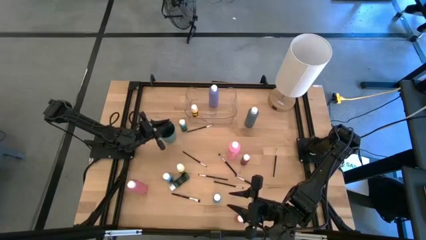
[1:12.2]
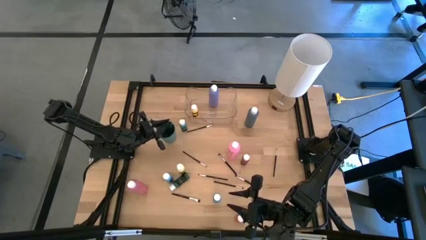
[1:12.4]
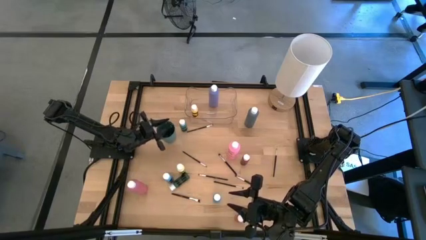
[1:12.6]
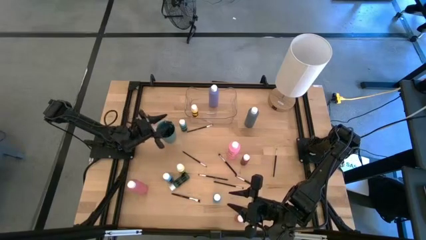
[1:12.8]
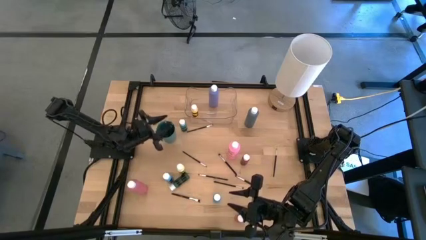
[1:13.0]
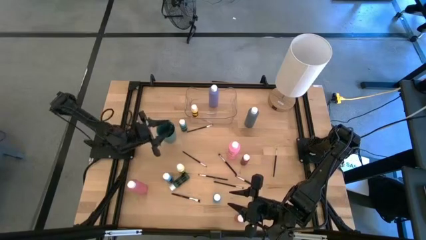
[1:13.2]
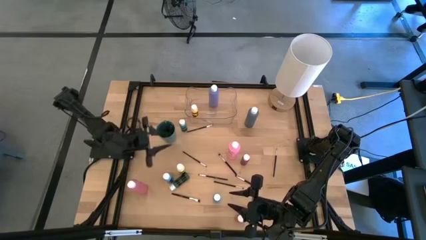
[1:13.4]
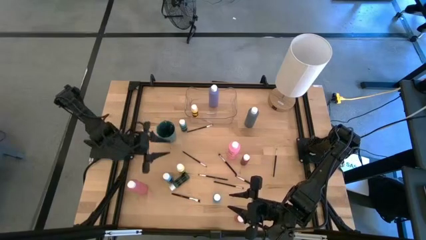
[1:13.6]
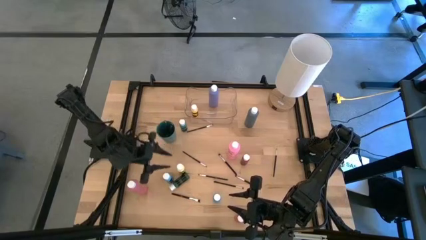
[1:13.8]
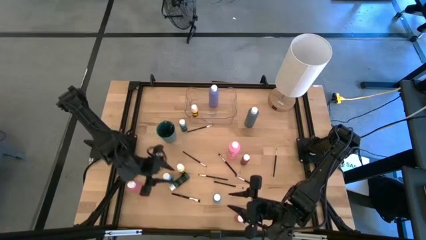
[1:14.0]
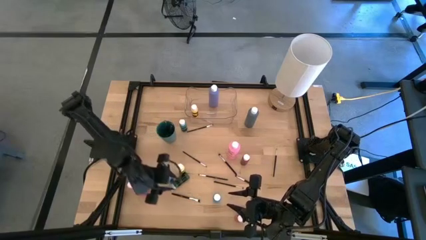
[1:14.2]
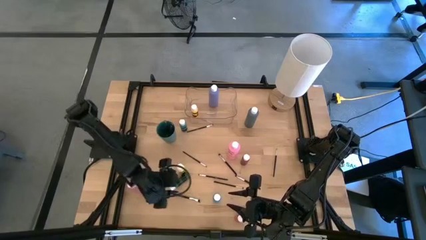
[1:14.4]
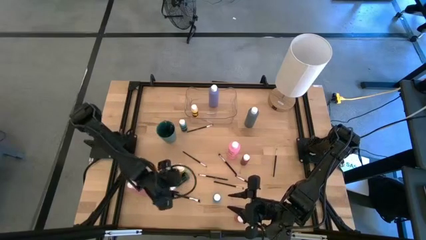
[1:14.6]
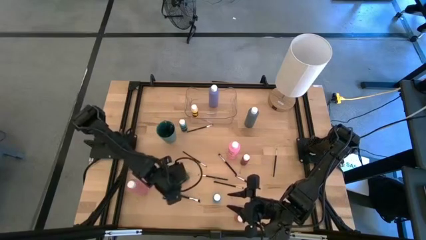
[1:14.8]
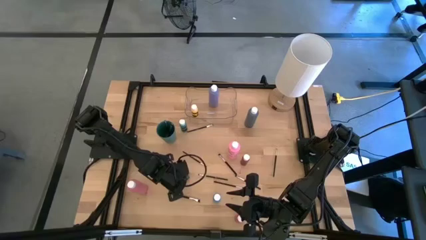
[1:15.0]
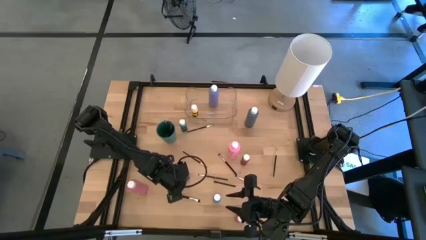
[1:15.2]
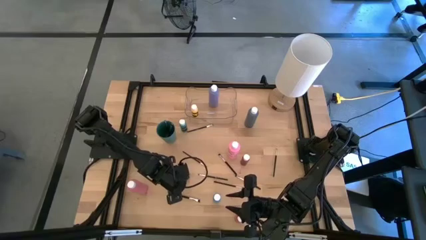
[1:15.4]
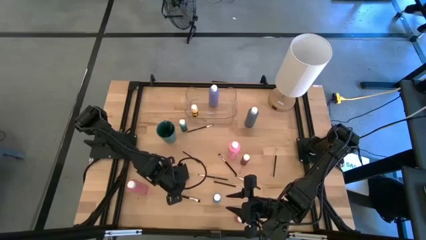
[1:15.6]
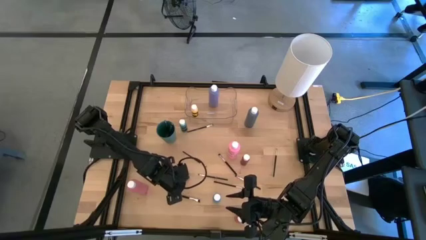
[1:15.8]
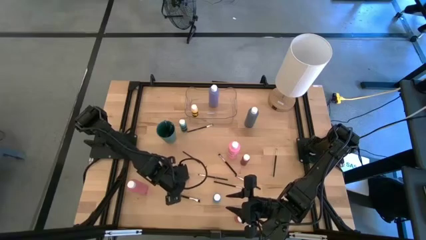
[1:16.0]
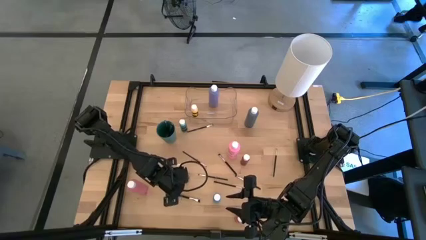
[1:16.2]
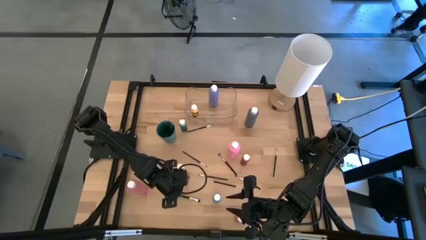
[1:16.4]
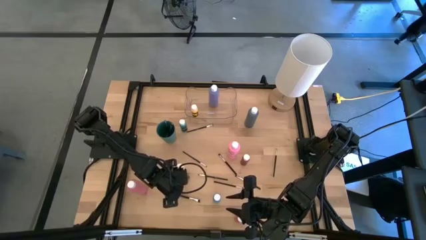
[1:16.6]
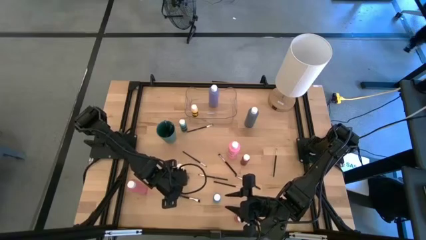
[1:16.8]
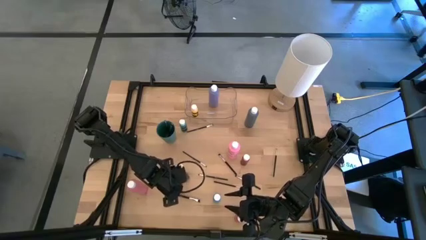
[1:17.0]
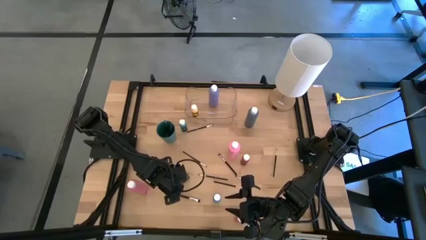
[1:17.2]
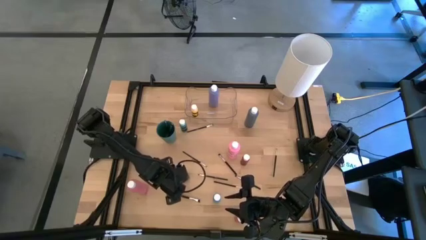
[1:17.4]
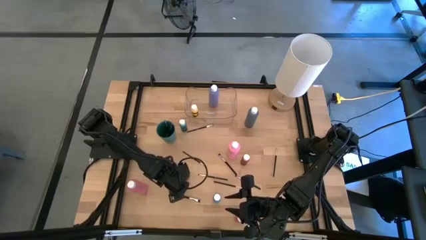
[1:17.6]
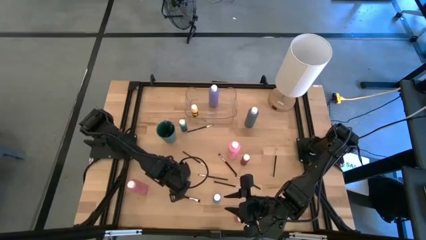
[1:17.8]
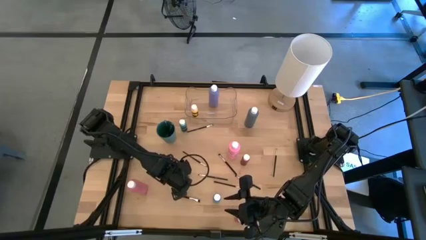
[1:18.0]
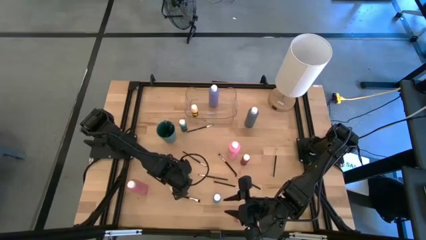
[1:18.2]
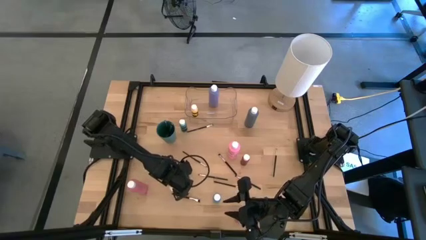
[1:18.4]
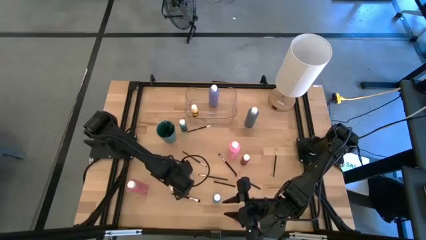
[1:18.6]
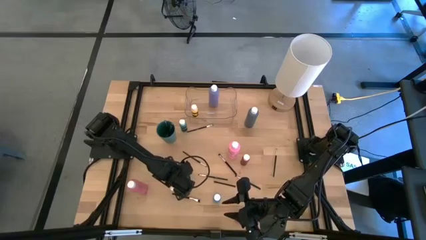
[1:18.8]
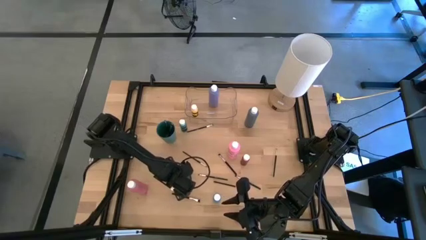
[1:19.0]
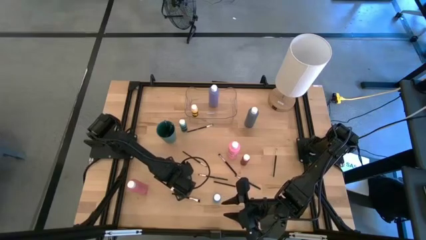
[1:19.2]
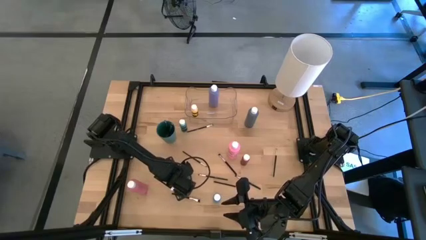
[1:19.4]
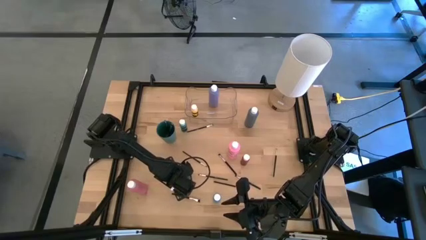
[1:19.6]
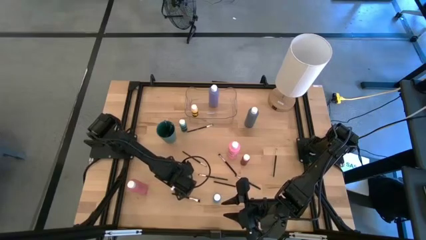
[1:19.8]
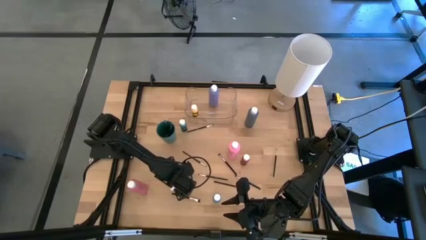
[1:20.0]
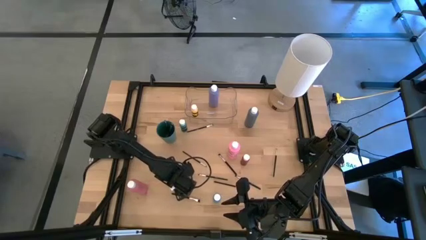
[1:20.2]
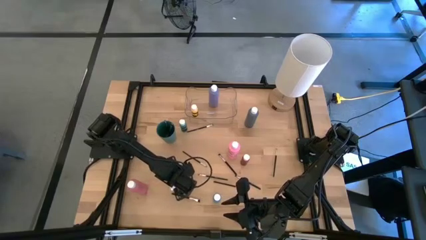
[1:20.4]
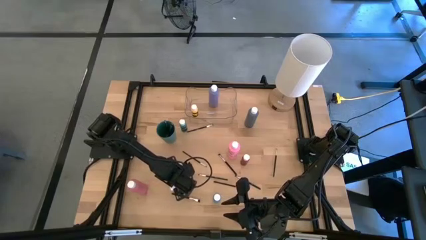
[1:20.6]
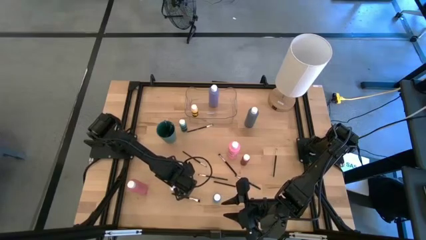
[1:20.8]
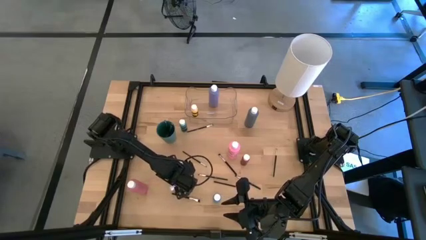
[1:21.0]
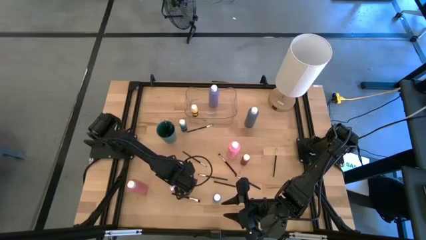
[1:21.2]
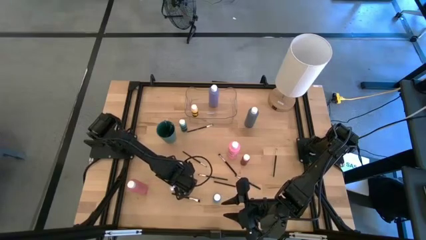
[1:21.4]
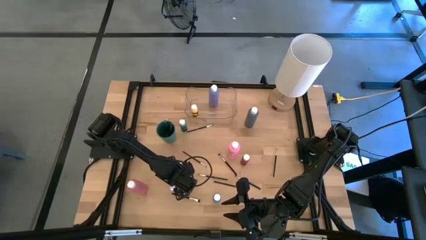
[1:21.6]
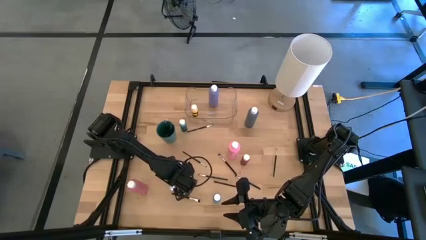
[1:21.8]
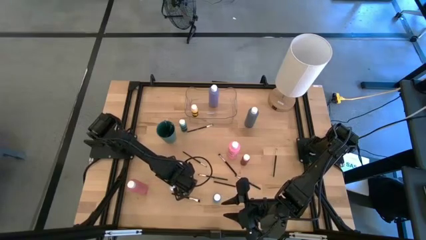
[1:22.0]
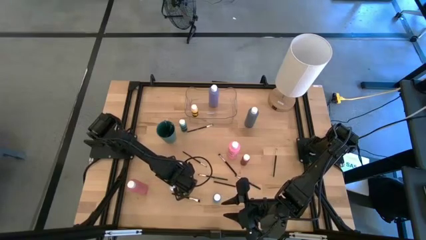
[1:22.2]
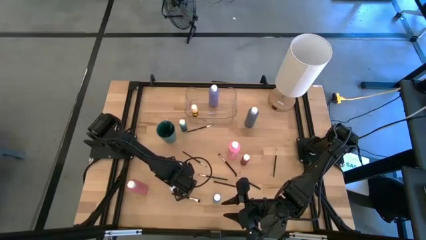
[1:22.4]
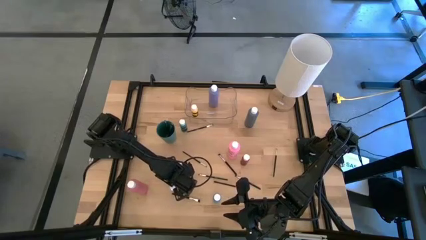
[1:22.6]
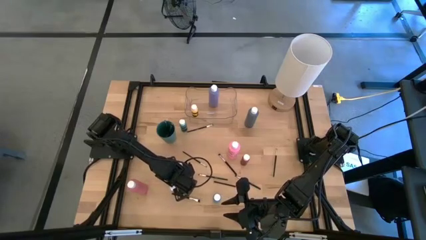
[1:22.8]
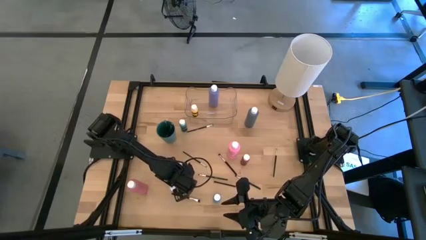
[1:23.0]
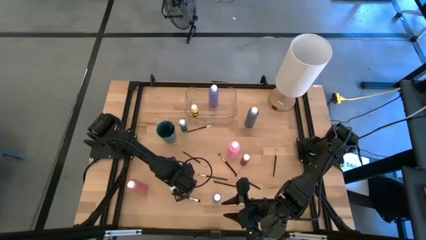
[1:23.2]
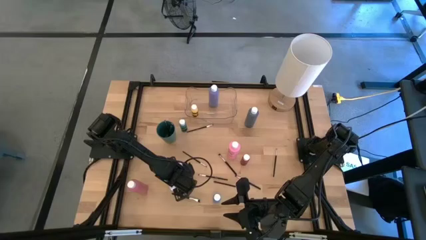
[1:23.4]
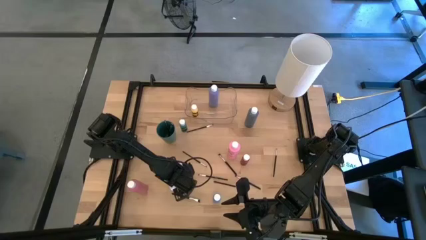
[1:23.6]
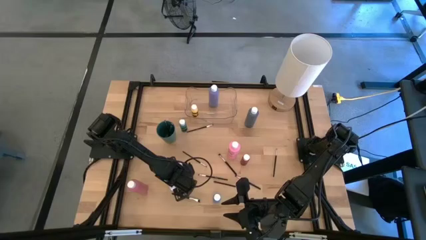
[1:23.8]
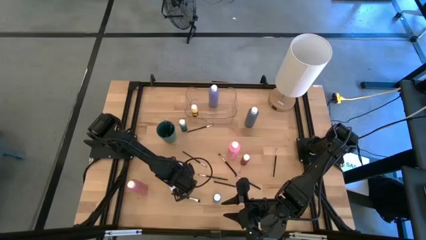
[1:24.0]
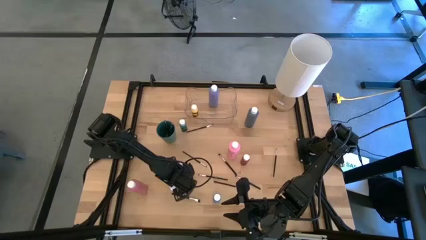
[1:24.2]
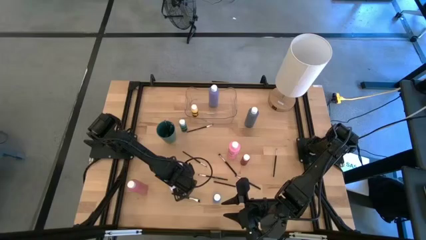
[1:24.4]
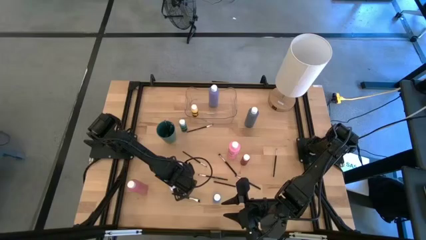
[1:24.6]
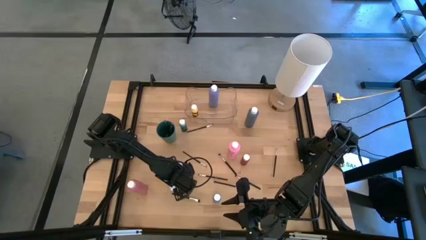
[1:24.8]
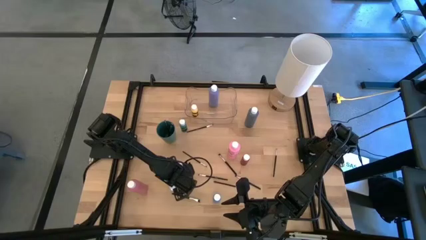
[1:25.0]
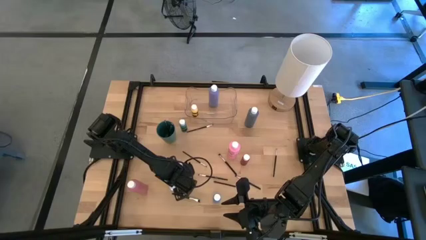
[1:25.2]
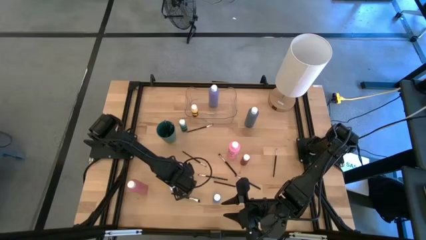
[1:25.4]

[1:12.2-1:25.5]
Task: Pick & Place Paint Supplies
Put the green paint bottle into the transparent bin

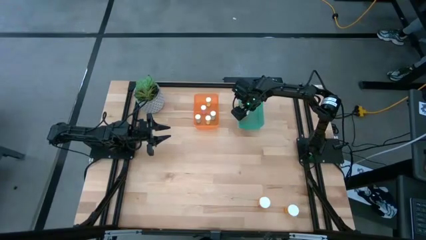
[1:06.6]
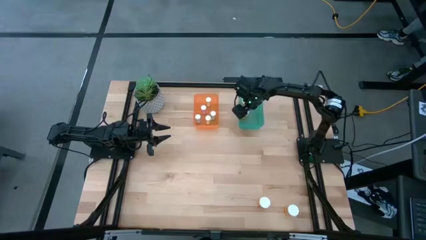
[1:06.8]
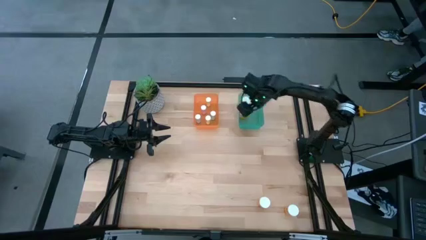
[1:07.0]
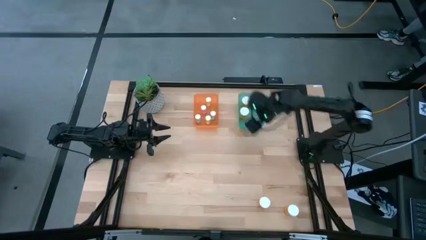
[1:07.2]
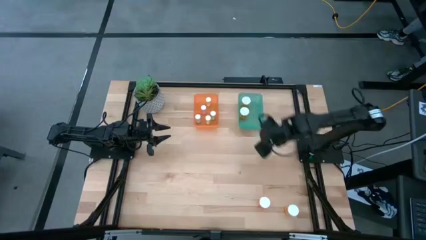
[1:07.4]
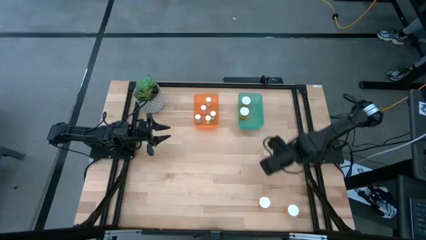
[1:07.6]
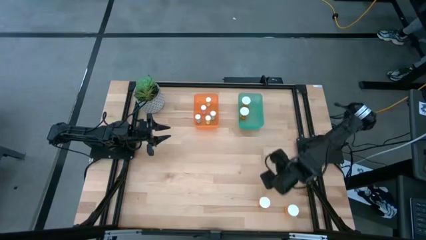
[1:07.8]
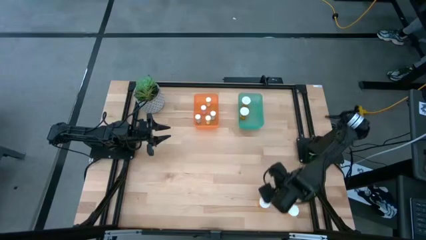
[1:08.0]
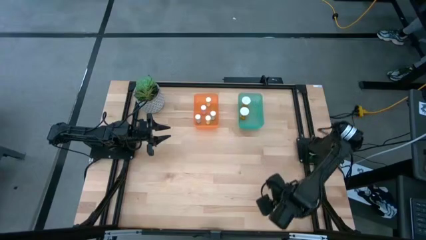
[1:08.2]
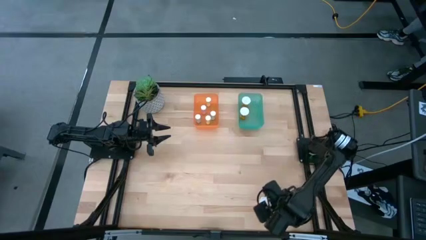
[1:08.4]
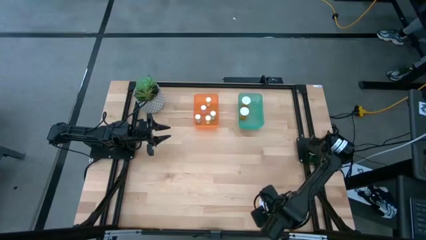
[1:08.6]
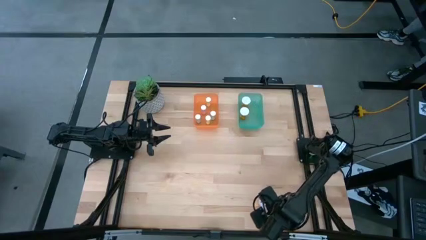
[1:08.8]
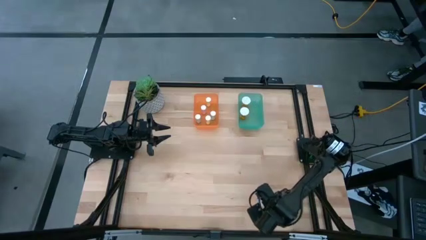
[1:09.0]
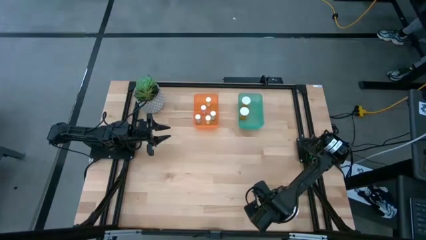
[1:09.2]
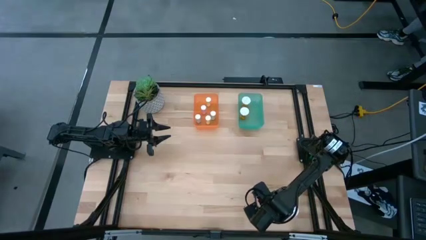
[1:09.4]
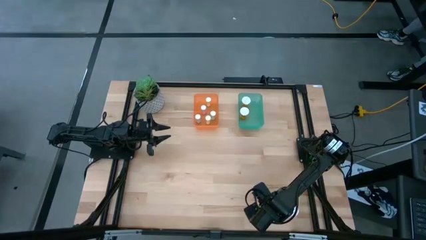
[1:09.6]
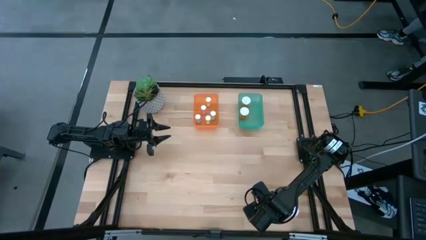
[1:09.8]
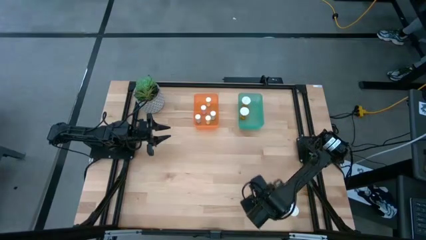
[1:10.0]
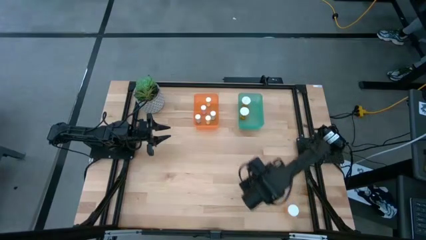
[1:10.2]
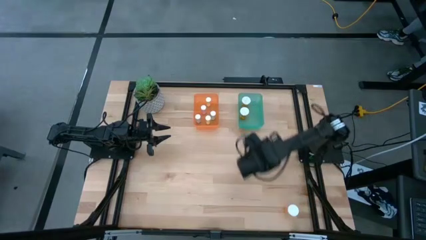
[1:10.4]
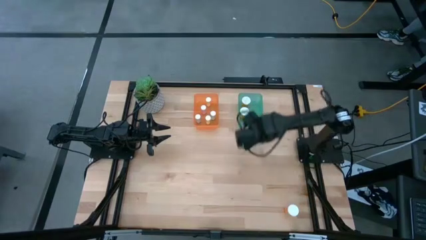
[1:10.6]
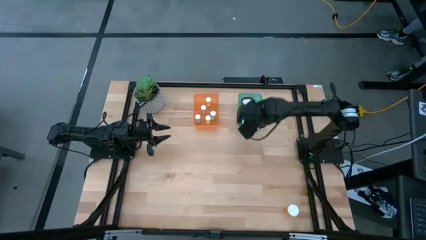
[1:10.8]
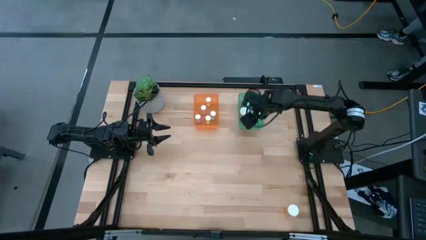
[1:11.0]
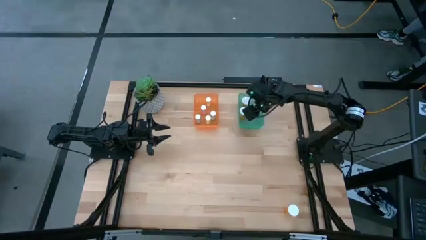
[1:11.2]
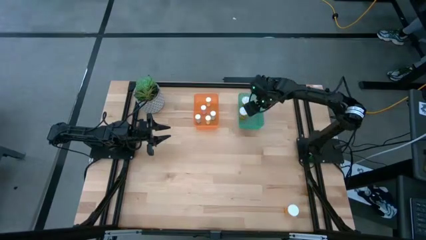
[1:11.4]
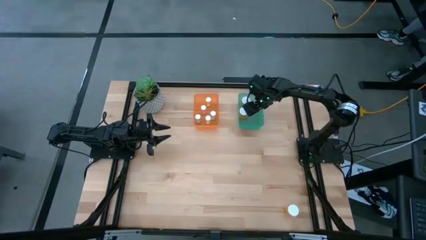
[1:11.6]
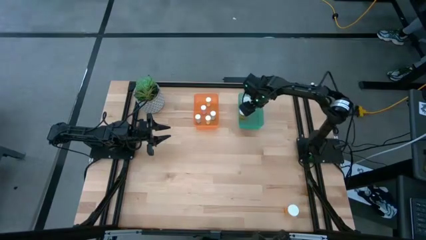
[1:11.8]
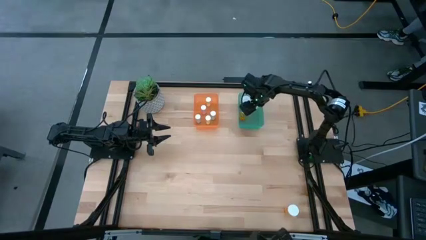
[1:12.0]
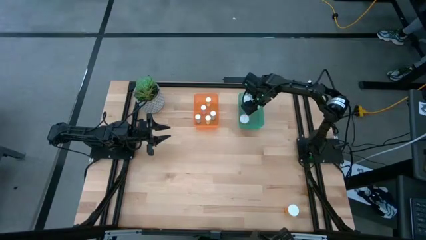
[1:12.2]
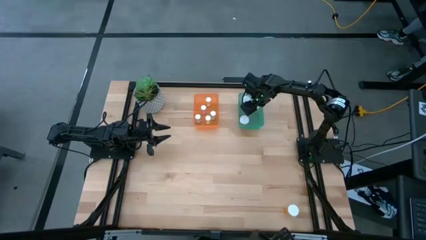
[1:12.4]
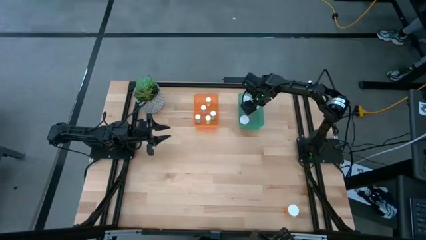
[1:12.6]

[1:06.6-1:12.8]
Task: Pick and place medicine bottles into bin by pill shape (circle, oval)
Put the large orange pill bottle into the blue bin
